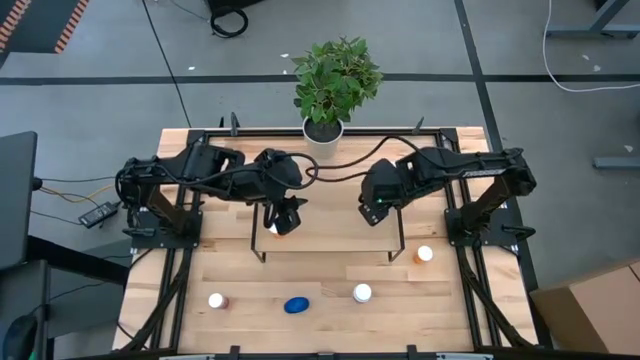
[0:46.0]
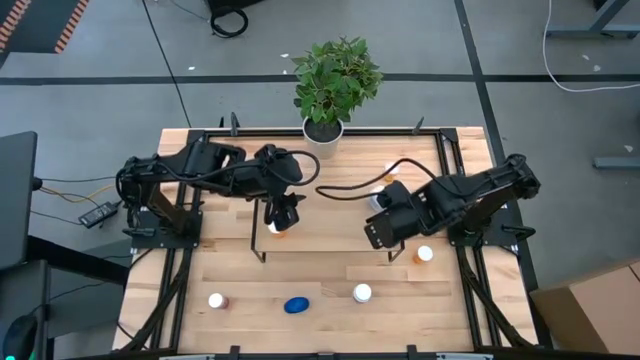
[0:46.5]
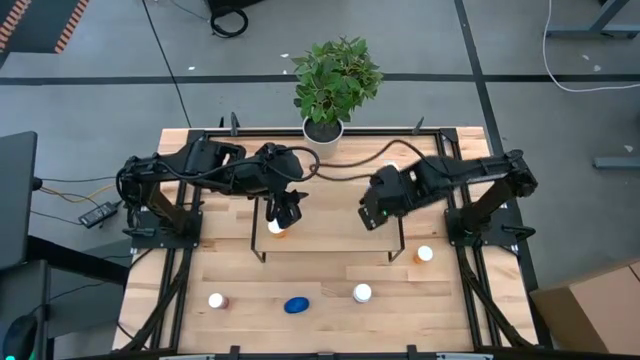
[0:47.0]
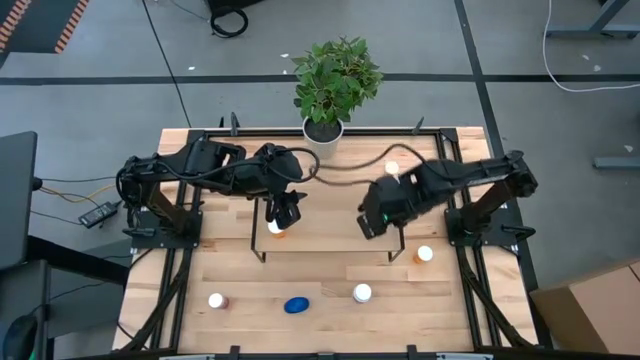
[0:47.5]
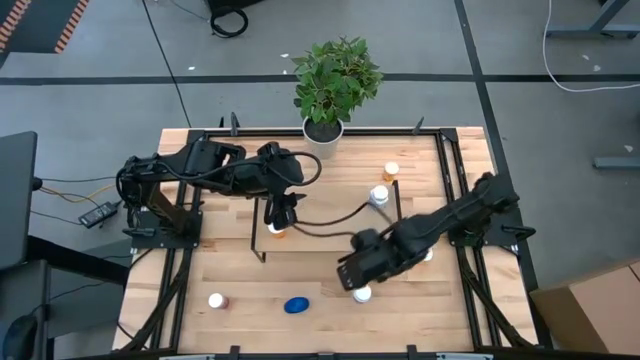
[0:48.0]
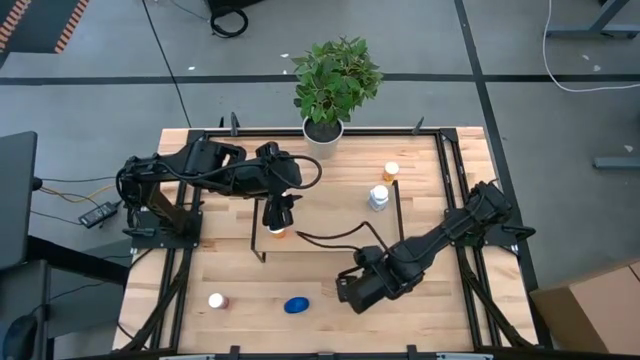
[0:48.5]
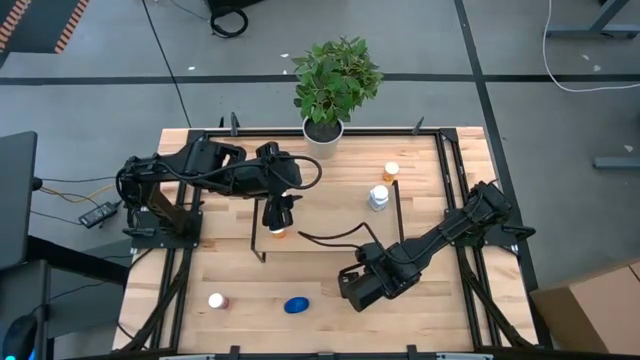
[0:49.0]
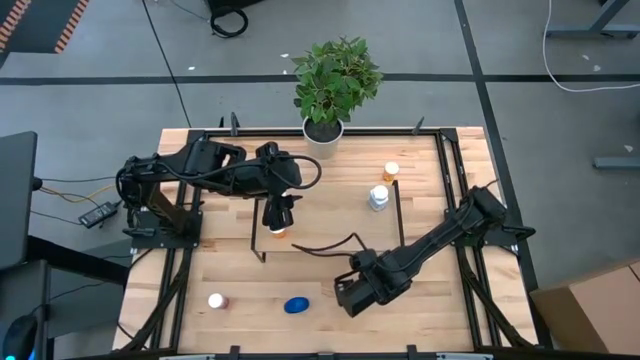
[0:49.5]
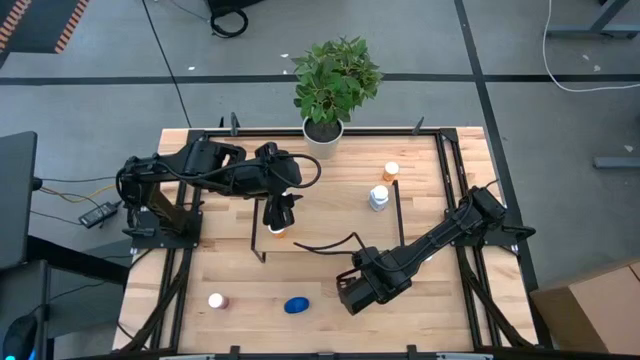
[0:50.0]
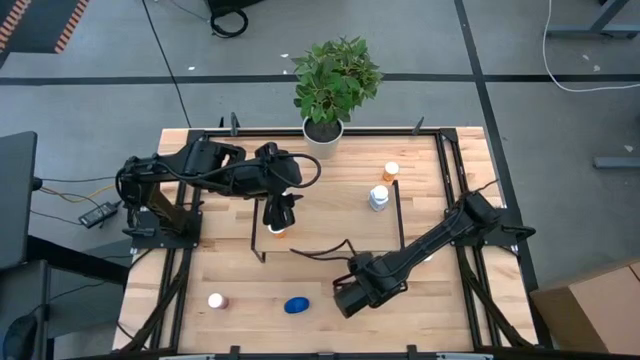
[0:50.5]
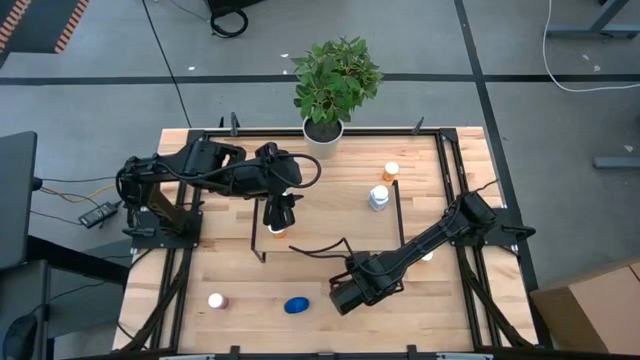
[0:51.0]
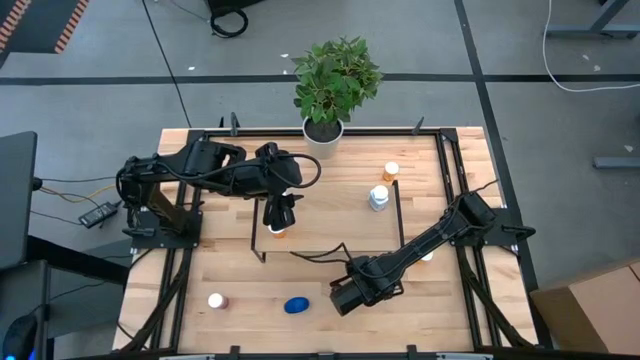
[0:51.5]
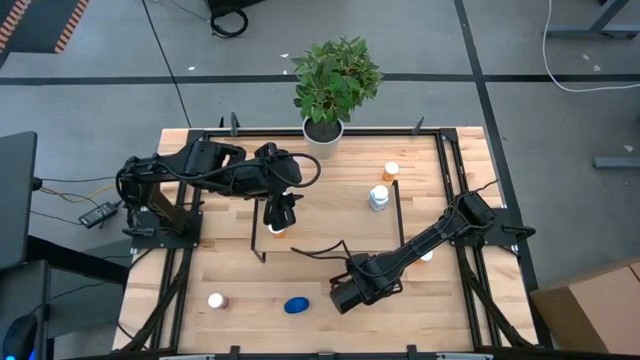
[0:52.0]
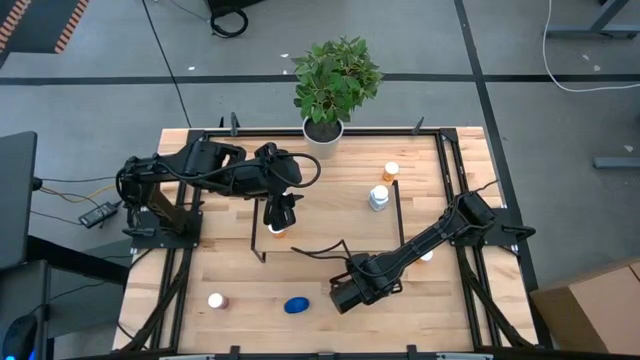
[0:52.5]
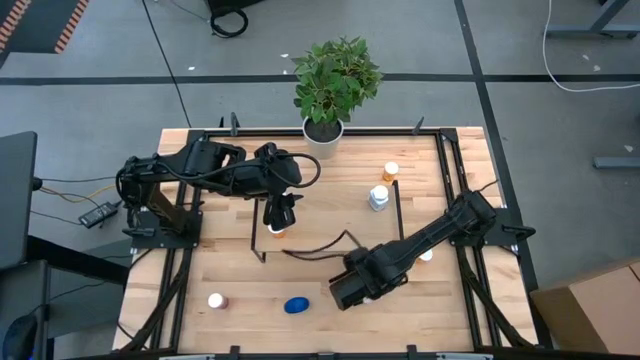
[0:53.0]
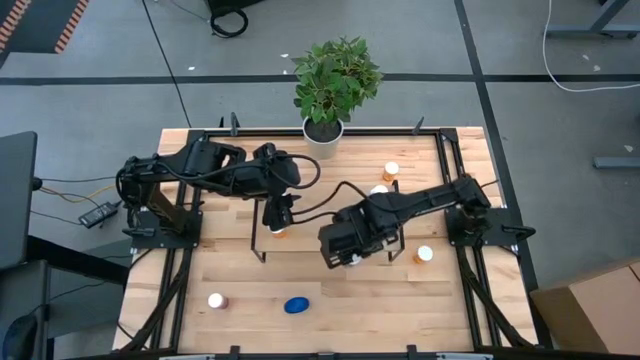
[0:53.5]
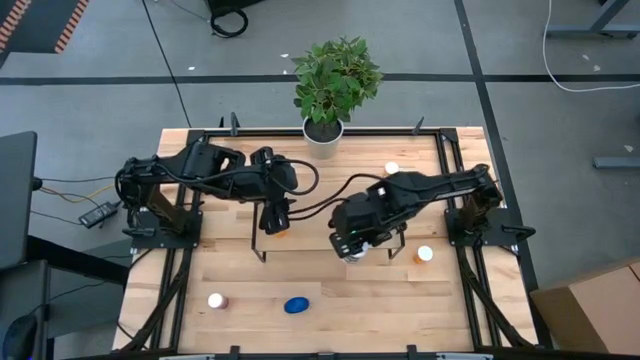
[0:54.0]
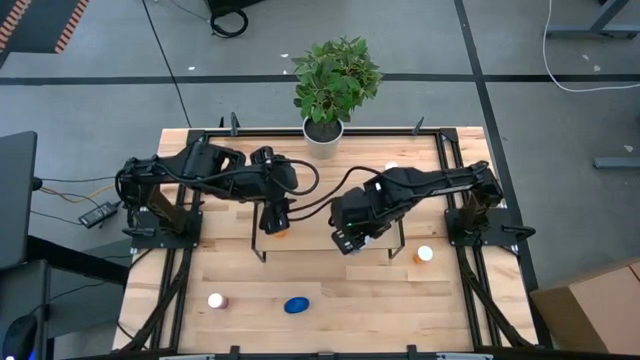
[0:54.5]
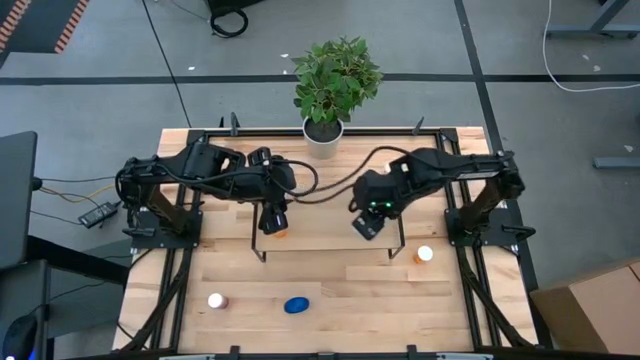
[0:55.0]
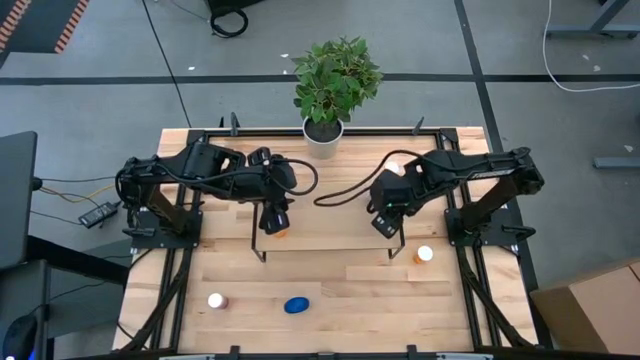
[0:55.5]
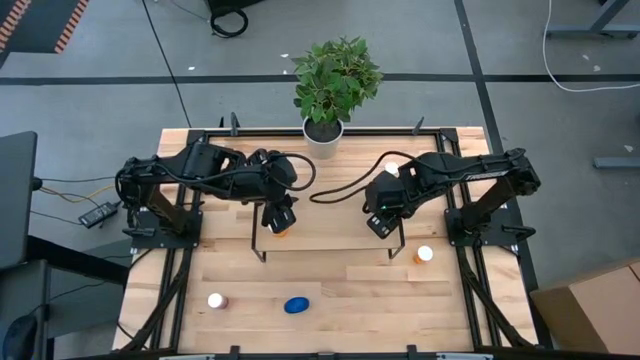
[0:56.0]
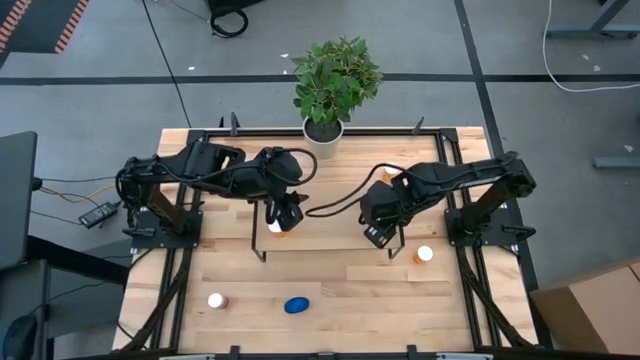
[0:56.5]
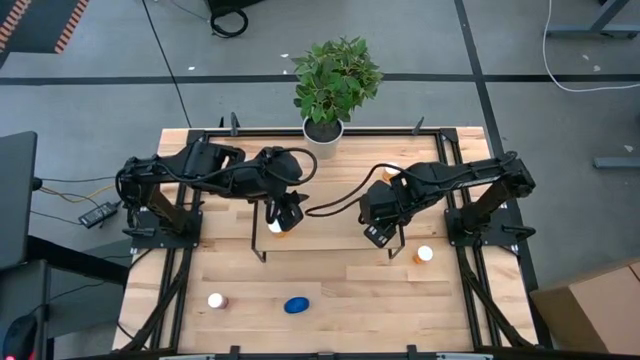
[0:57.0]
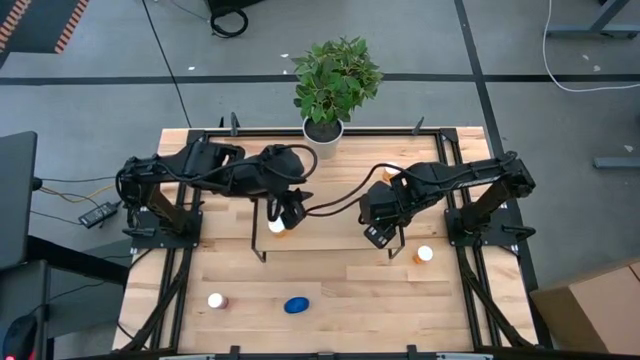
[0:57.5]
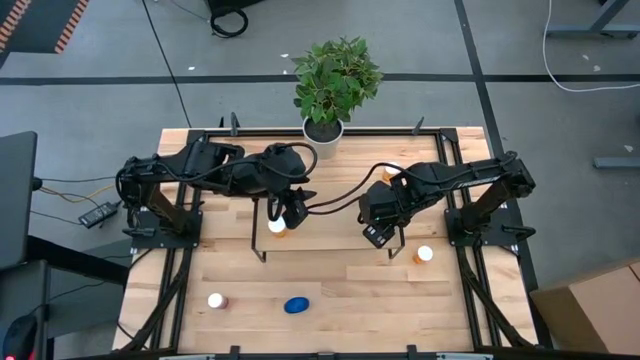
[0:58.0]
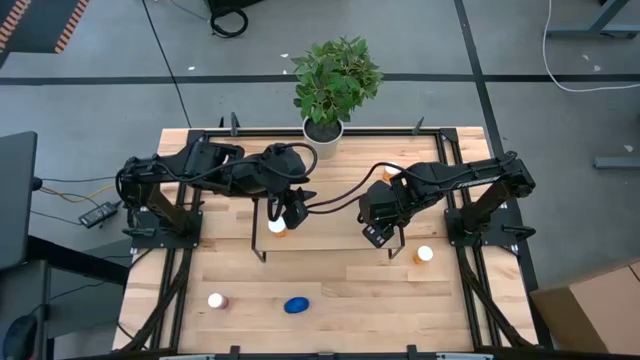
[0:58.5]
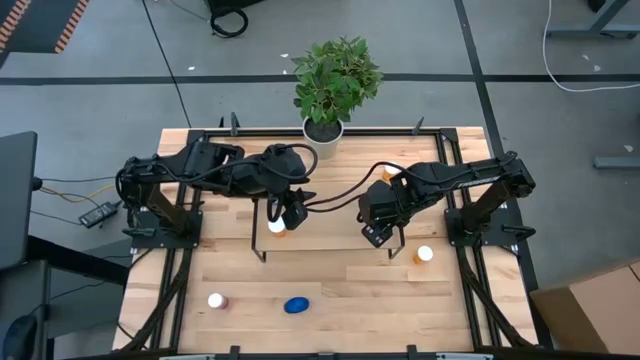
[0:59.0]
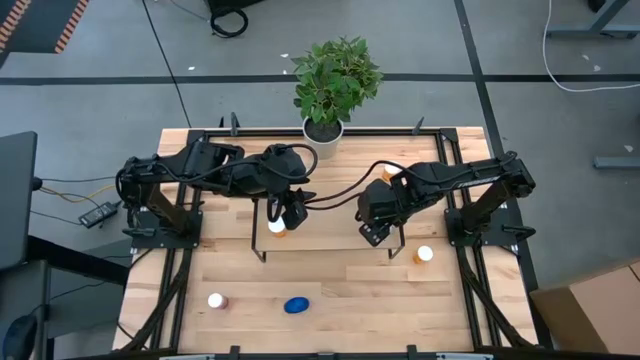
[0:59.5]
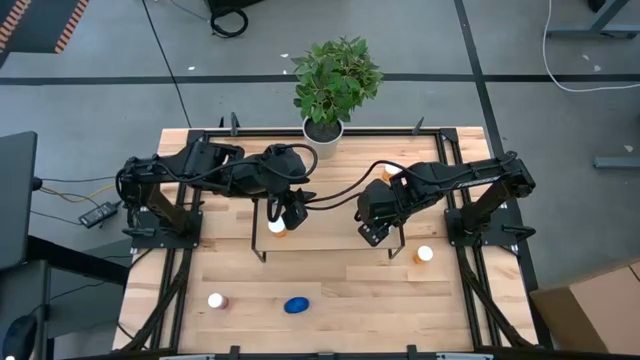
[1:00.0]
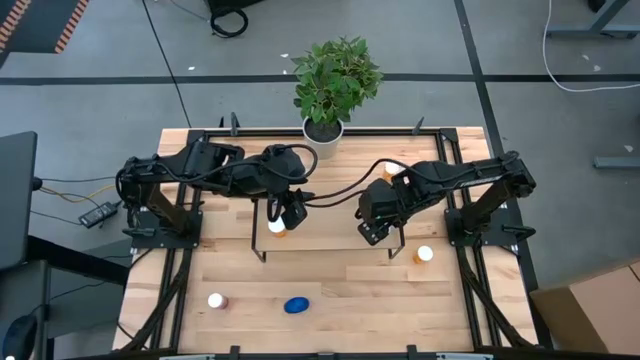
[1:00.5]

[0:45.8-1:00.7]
Task: Pick and place medicine bottles onto shelf by color
Put the white and green pill bottle on the shelf

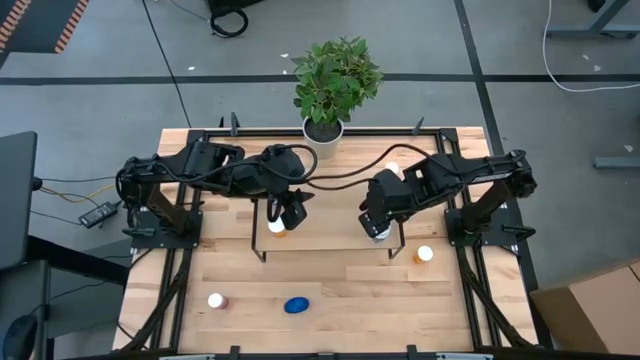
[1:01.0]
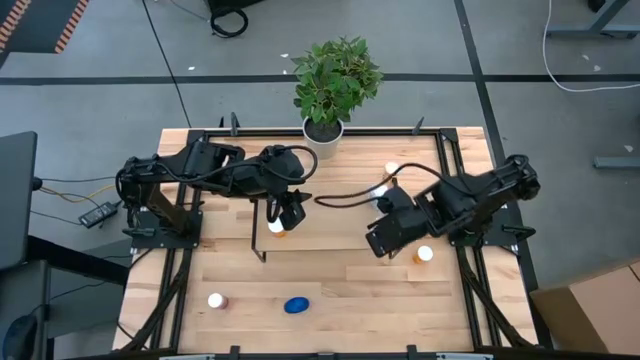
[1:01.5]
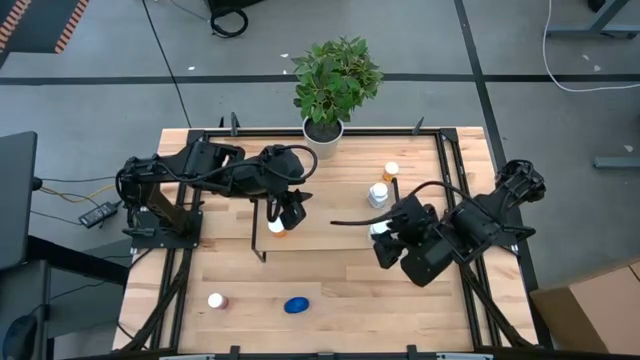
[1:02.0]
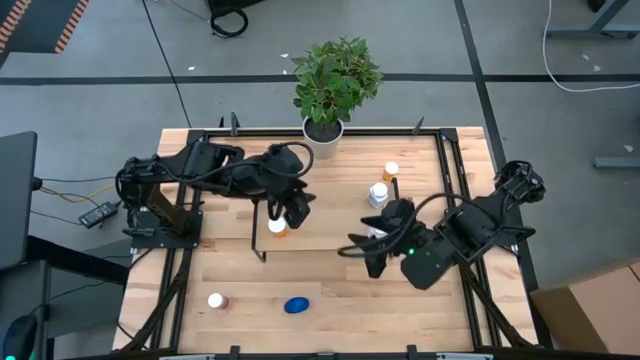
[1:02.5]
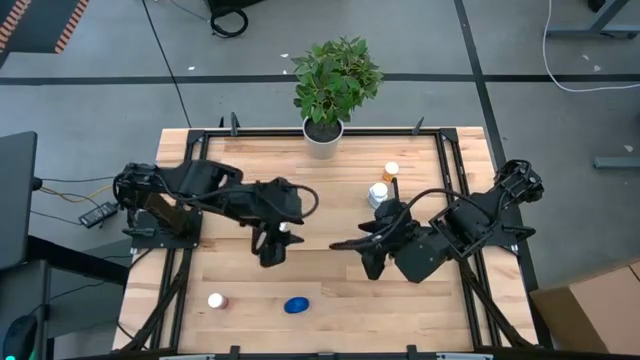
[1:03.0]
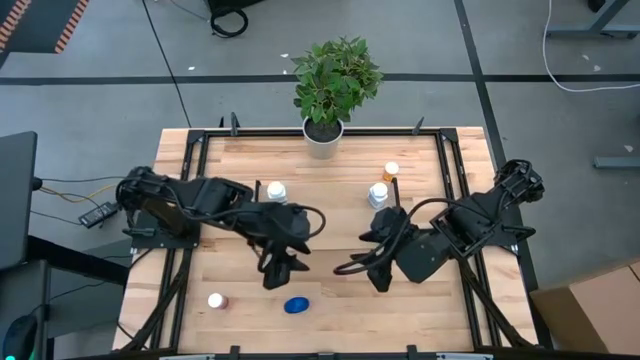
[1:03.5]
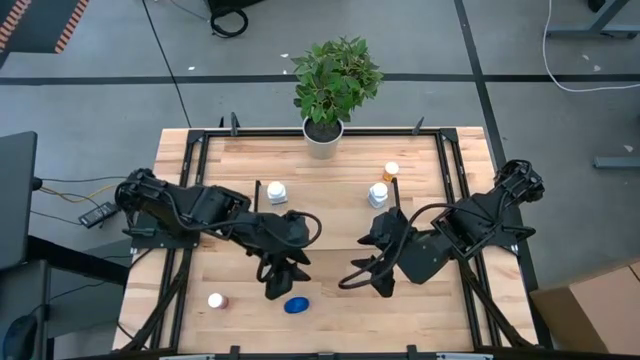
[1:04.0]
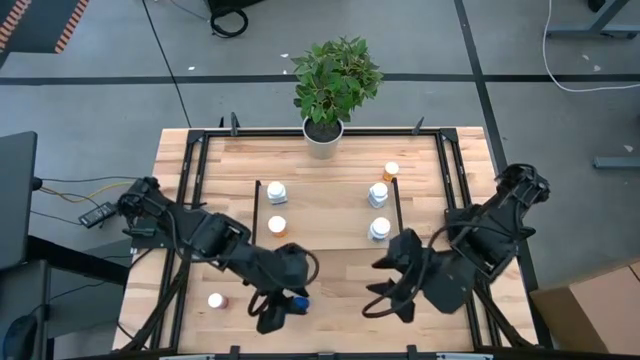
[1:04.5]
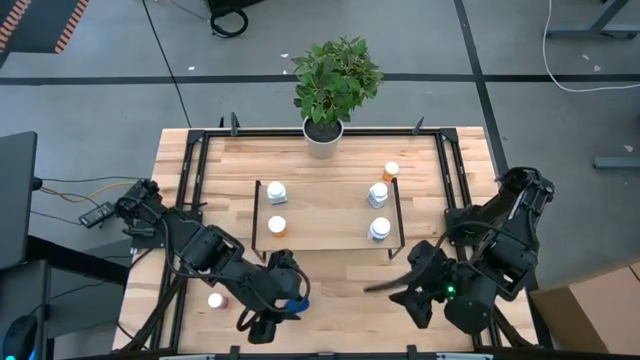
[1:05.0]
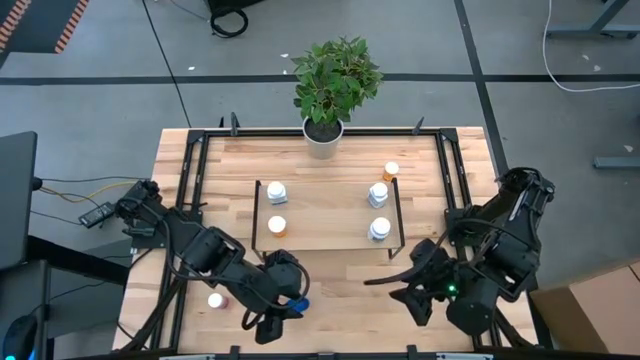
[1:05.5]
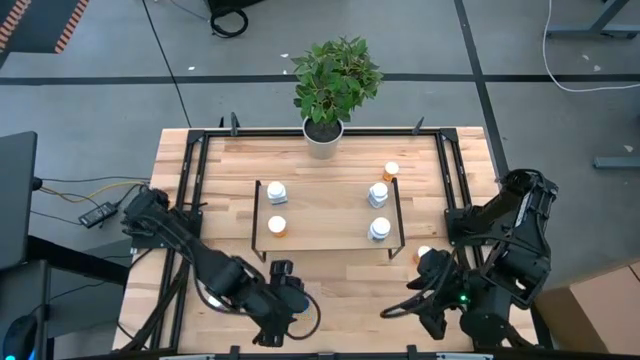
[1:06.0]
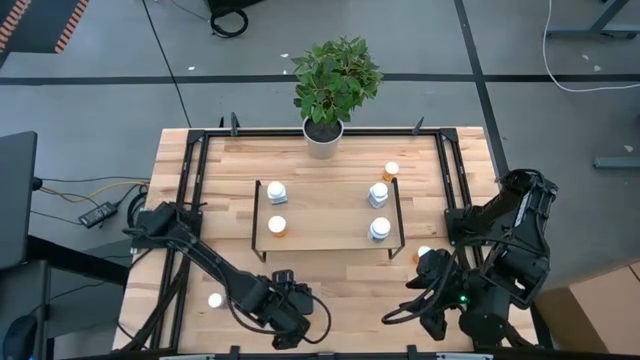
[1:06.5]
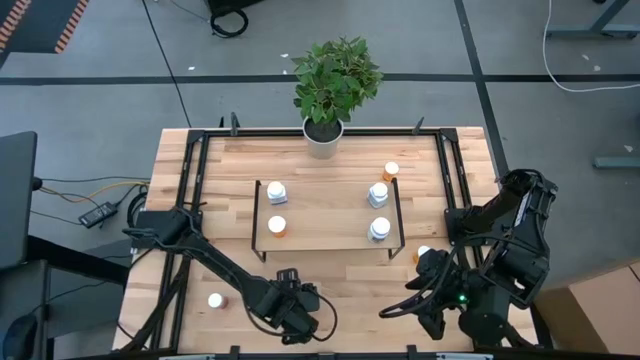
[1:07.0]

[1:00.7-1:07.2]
Put the blue pill bottle on the shelf
